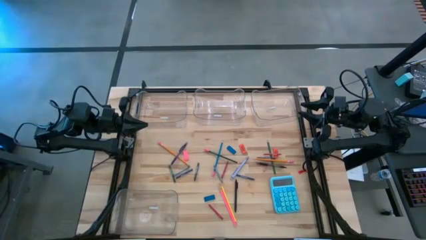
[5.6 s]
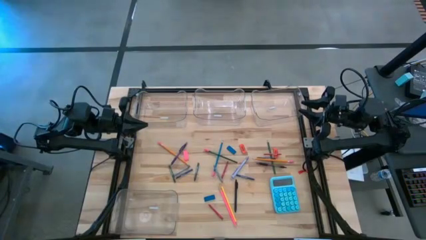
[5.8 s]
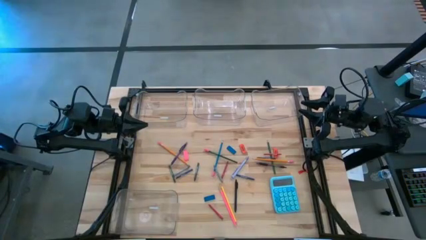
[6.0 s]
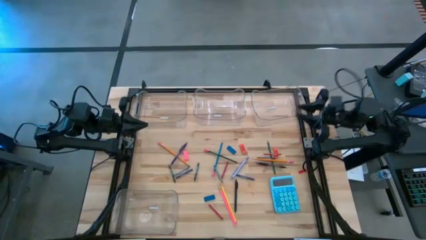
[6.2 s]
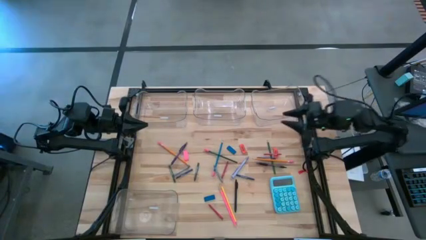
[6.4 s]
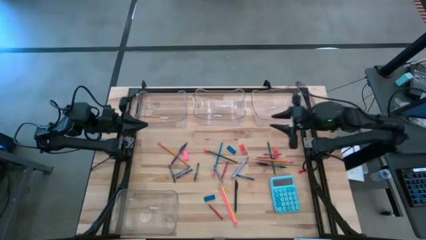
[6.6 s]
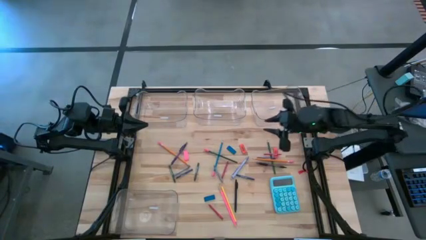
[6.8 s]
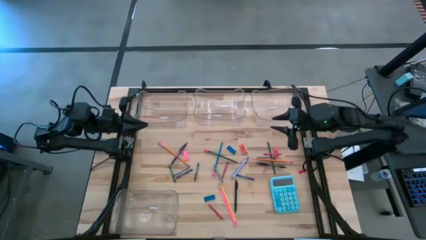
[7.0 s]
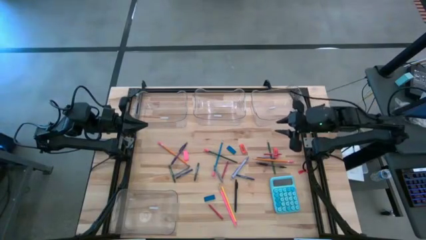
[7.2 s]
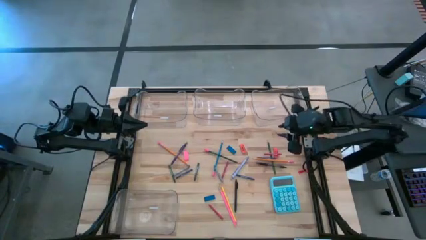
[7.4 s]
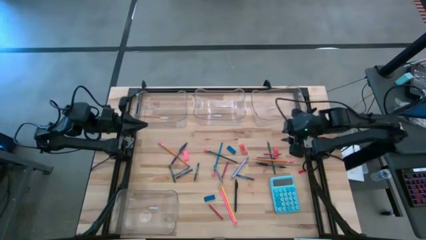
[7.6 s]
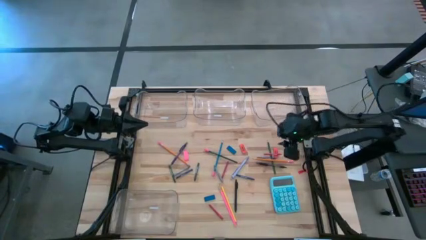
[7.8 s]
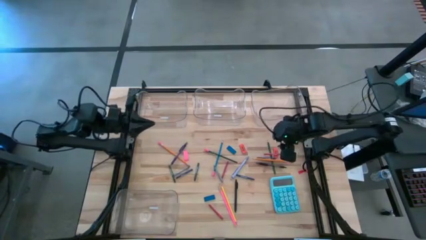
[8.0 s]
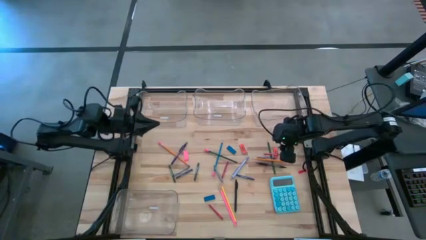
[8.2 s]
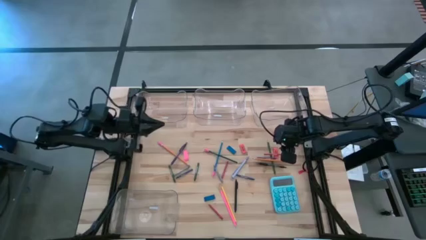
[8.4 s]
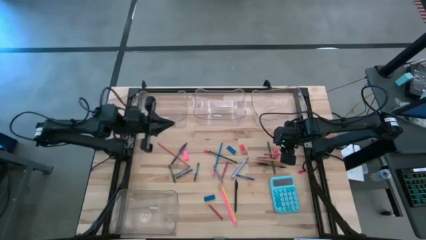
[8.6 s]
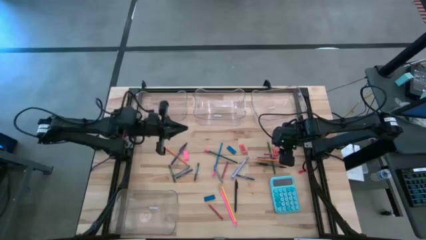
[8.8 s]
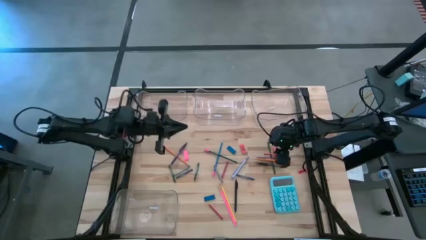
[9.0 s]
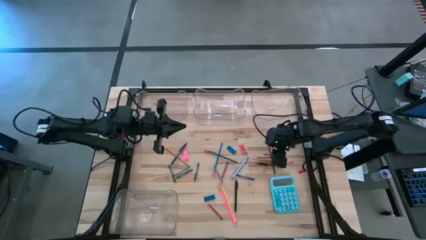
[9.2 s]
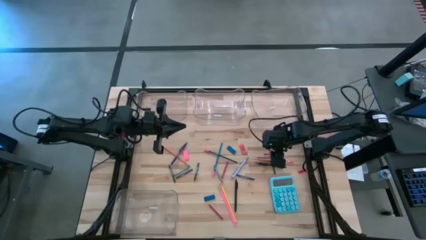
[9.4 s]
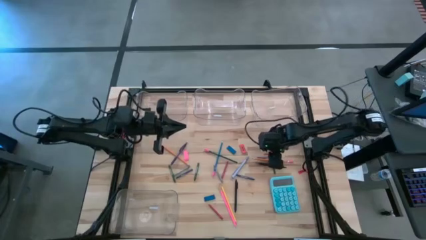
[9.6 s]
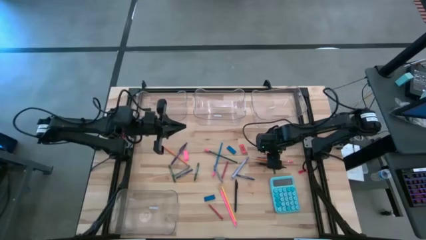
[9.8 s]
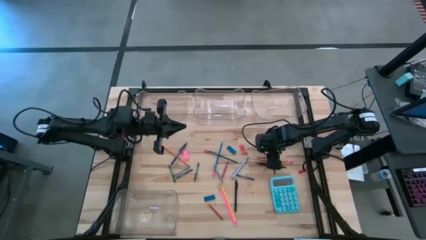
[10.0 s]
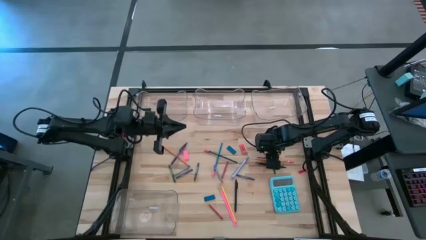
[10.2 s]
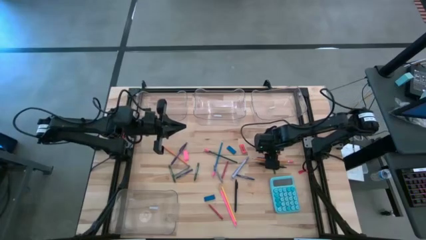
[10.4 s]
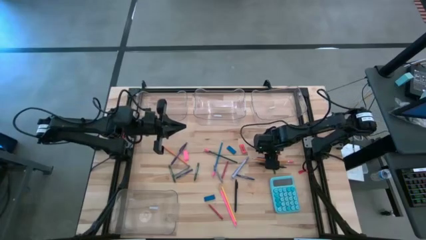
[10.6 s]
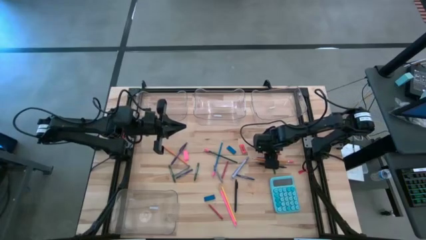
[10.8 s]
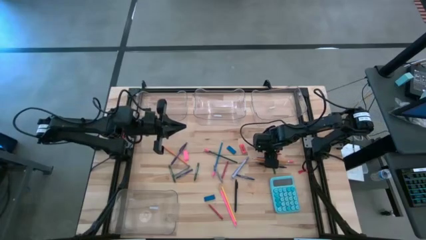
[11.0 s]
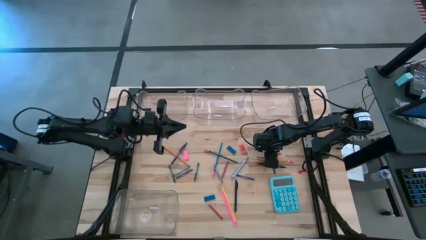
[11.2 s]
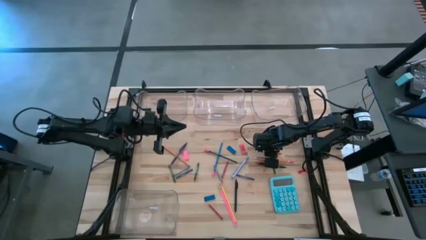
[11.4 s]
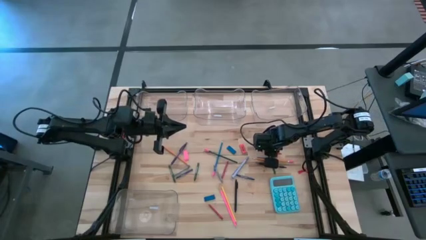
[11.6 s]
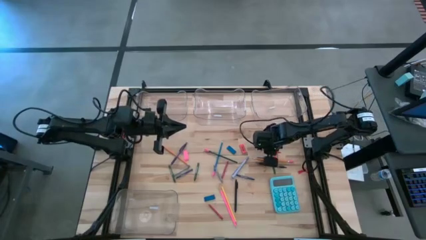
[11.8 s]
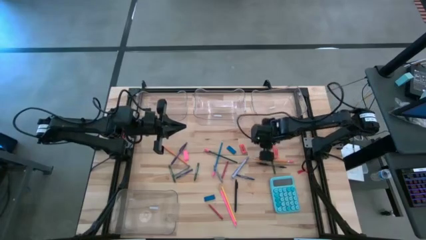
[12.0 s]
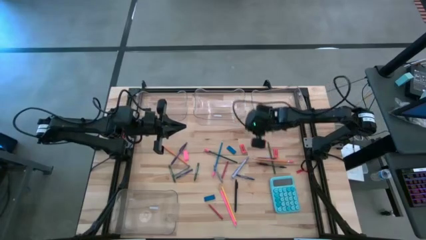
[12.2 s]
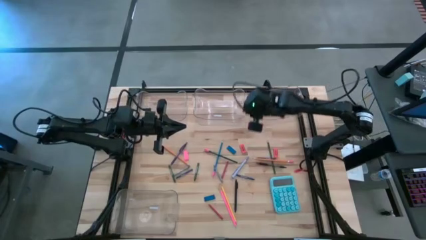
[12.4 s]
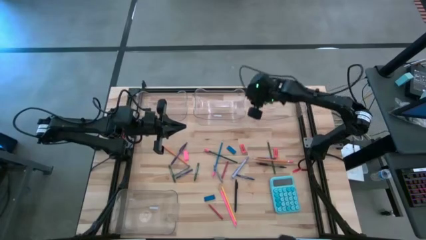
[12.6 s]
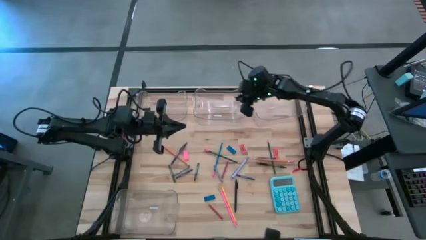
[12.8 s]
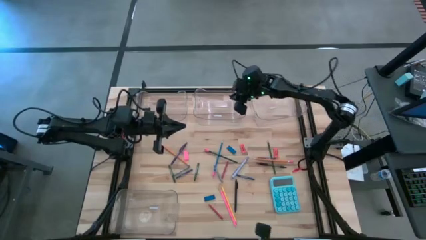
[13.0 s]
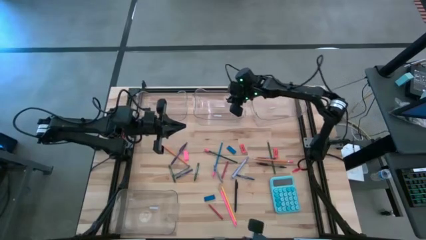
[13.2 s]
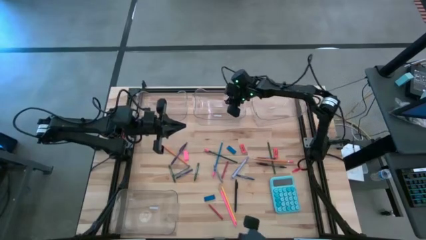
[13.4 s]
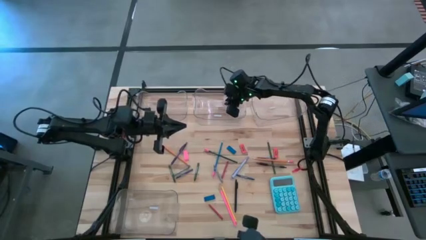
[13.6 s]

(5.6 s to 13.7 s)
Task: Sort crayons/erasers/pens/pencils in bins
Put the red crayon into the top middle transparent bin

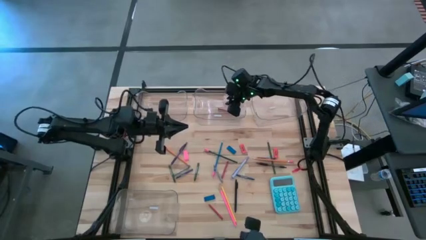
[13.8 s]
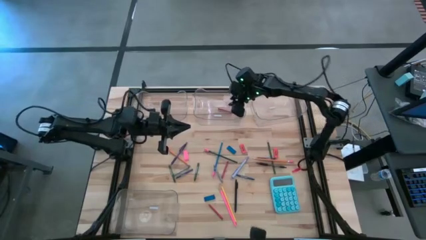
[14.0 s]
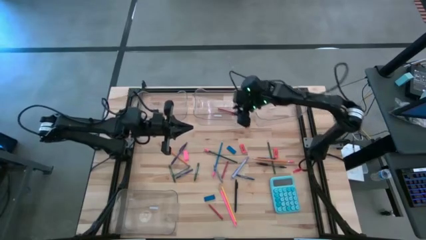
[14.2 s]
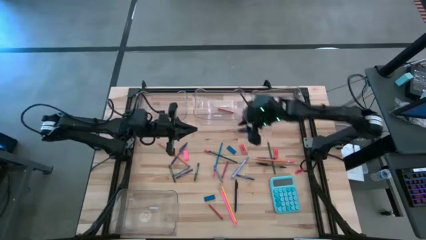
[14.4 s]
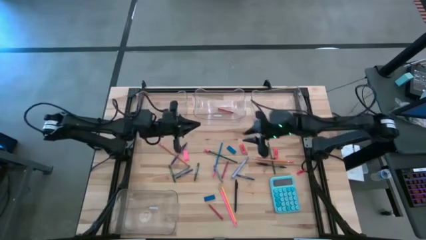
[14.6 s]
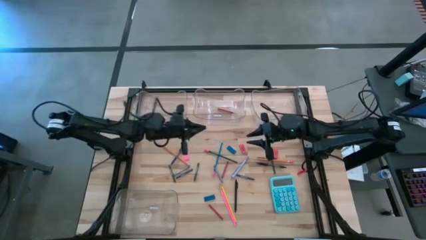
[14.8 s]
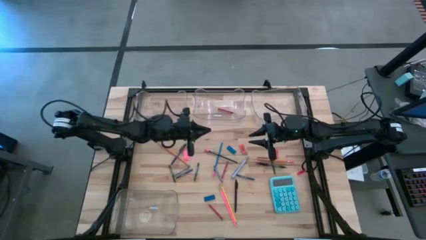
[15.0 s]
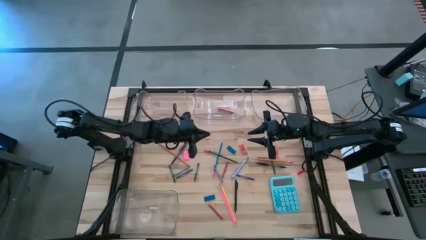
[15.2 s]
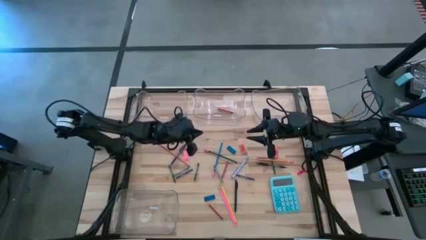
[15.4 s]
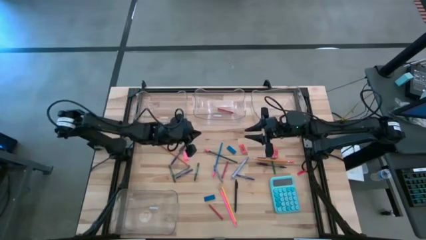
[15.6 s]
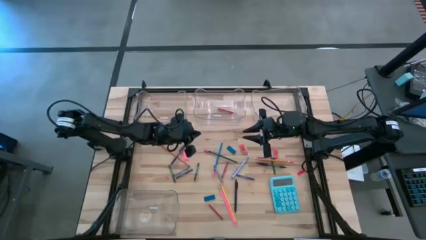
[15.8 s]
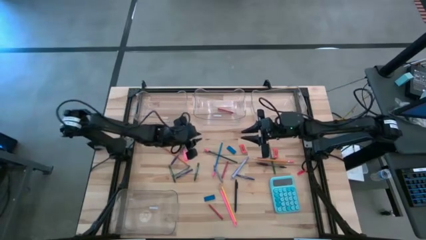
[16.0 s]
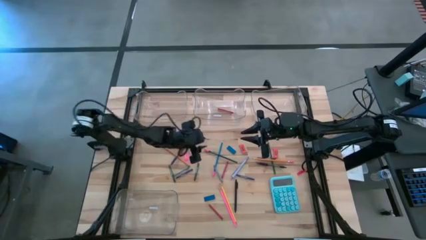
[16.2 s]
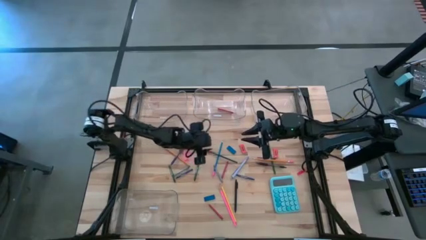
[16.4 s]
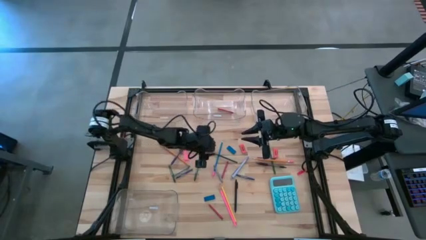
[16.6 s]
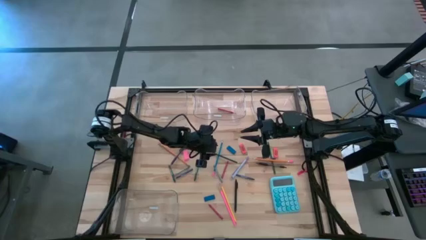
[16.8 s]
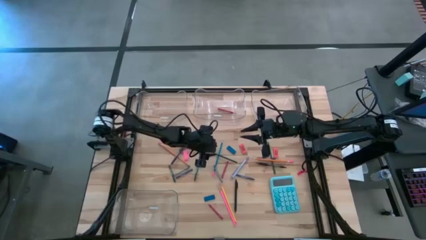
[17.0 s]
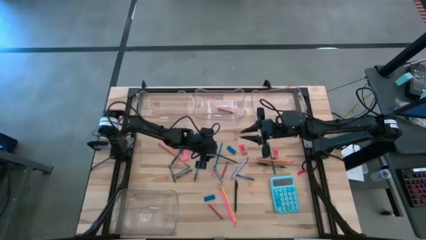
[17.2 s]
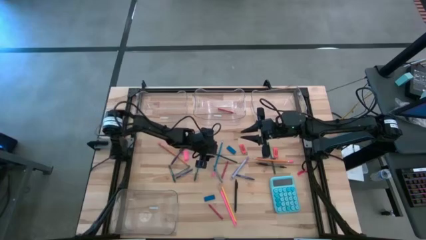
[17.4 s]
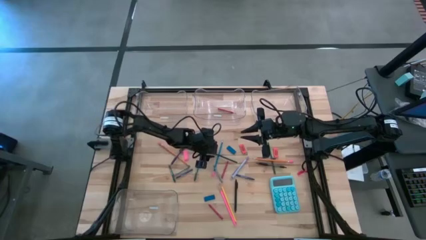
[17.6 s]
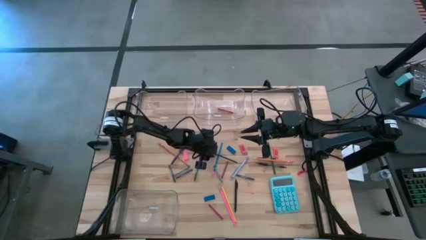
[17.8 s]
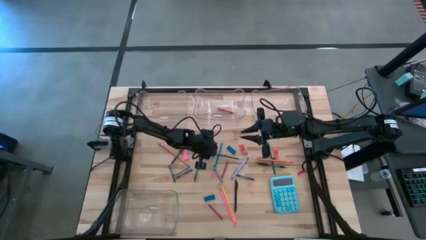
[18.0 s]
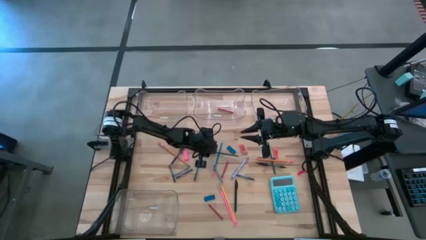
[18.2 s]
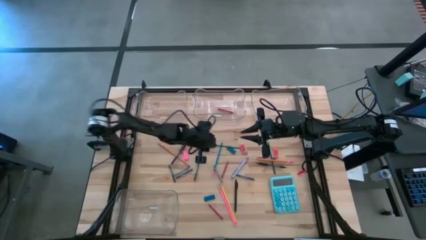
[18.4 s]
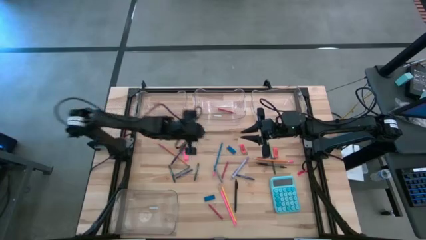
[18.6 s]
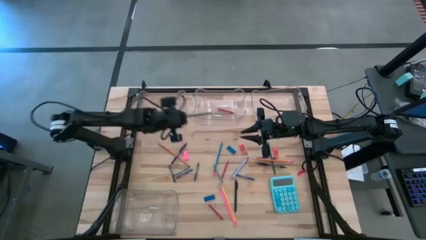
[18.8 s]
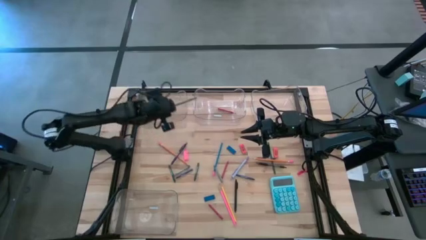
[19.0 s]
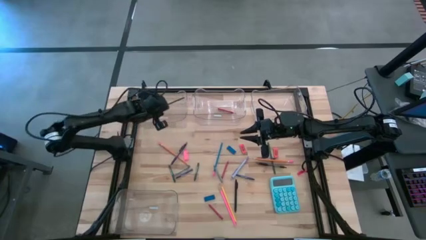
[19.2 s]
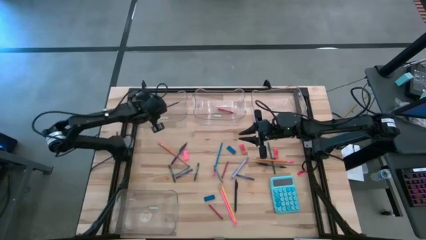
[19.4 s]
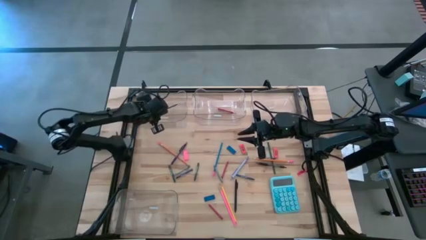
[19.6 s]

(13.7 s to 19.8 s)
Put the green pencil into the top left transparent bin

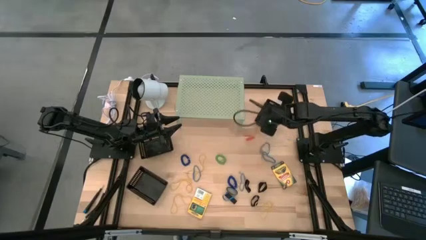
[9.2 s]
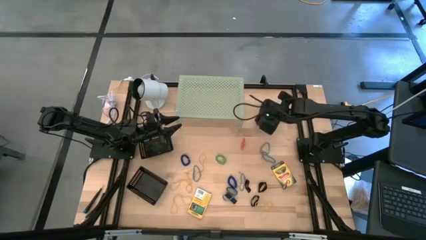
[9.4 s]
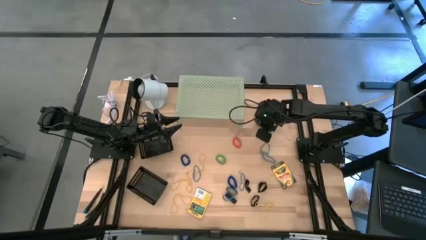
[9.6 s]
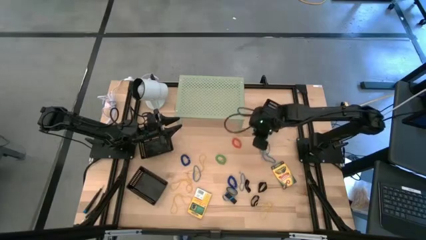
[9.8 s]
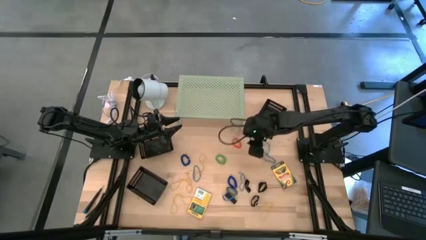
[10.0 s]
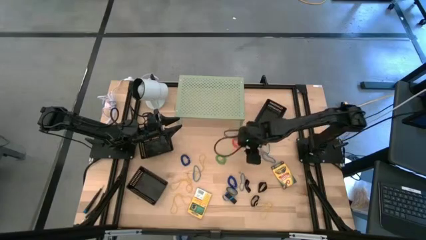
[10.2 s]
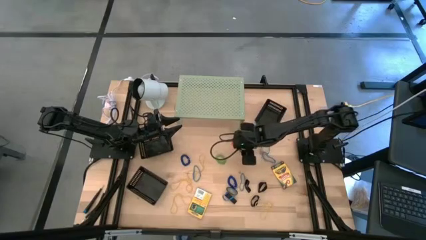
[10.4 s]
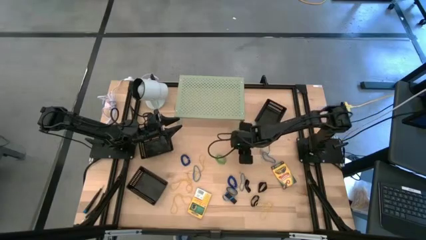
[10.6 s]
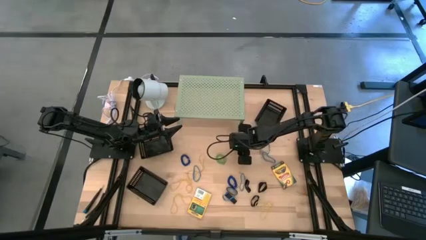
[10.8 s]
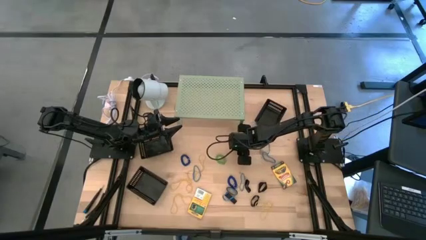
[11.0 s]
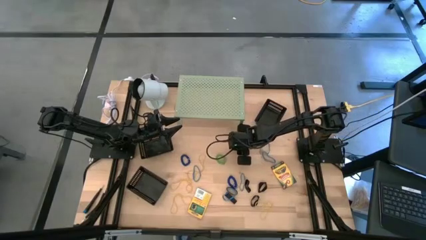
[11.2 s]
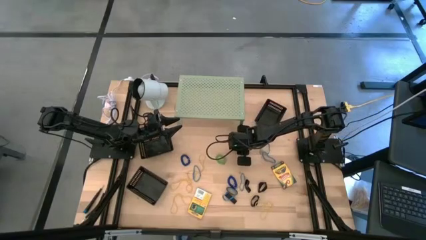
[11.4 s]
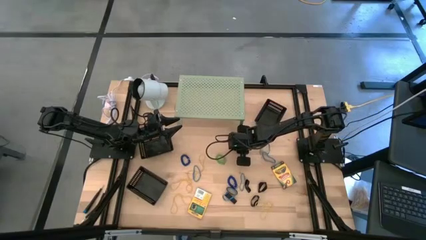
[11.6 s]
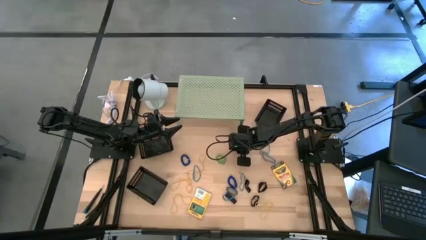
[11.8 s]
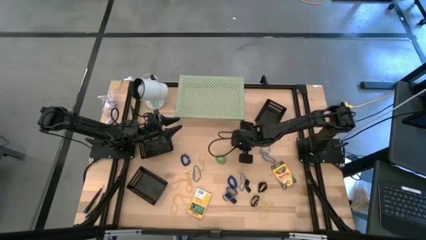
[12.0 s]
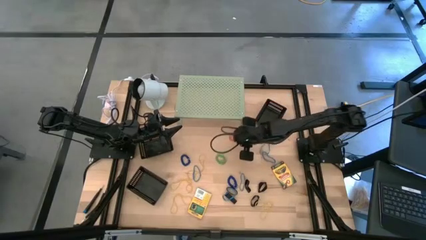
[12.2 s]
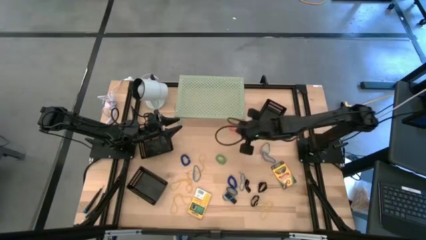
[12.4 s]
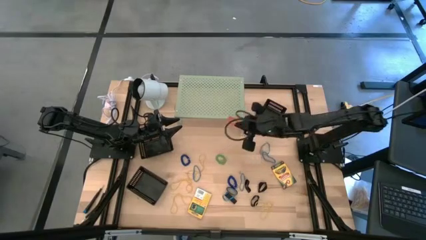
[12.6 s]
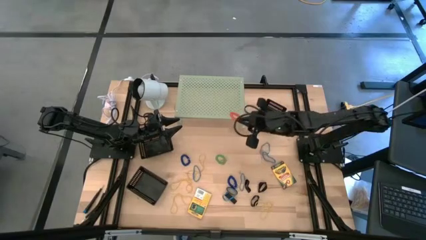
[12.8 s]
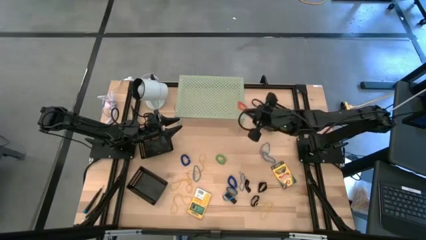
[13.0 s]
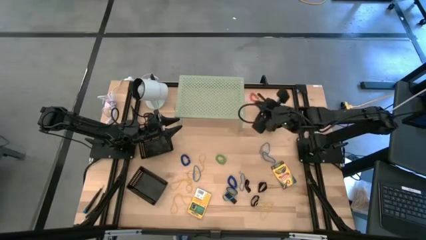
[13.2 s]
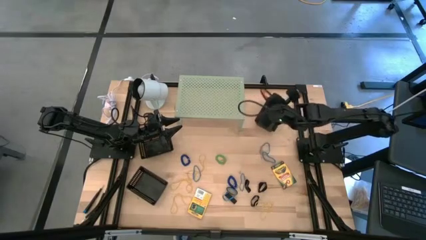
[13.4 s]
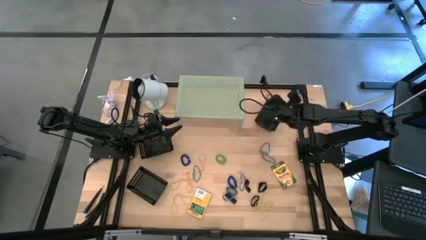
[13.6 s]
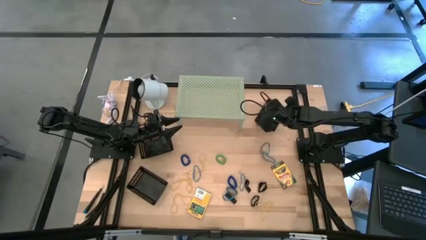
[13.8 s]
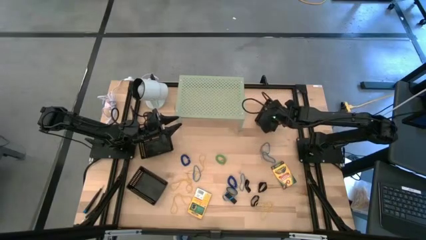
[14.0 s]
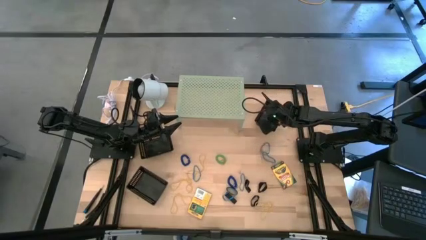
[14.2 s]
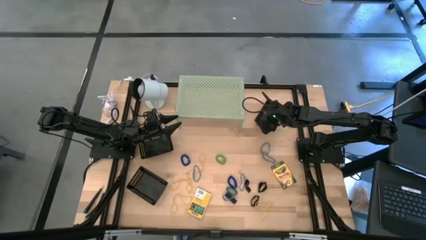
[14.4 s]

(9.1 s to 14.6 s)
Task: Pick & Place Office Desk Supplies
Put the orange spring keychain into the top right black bin
